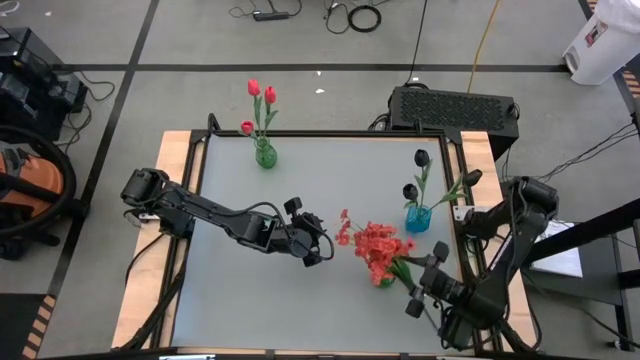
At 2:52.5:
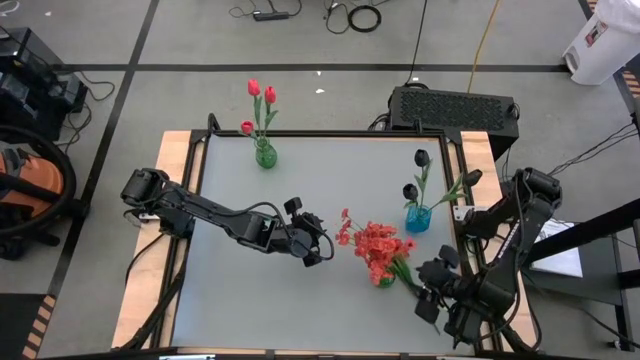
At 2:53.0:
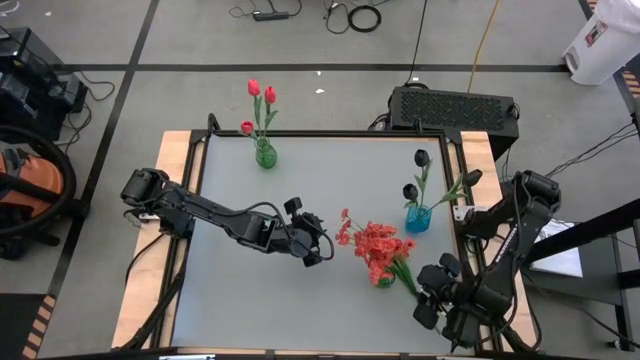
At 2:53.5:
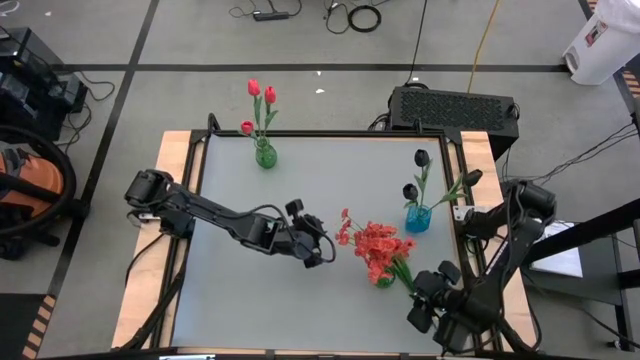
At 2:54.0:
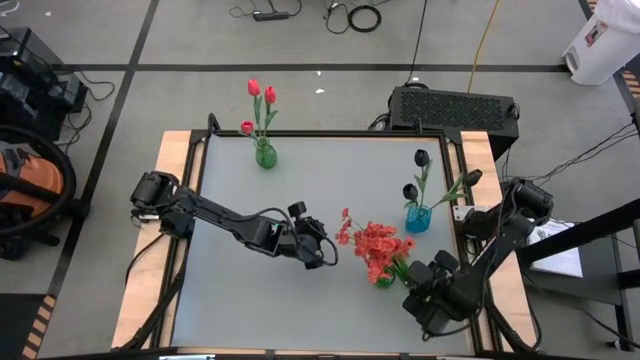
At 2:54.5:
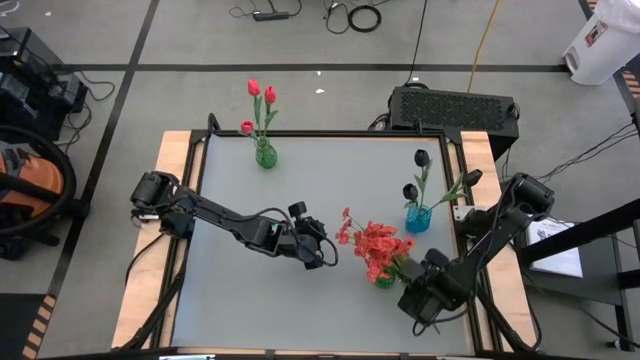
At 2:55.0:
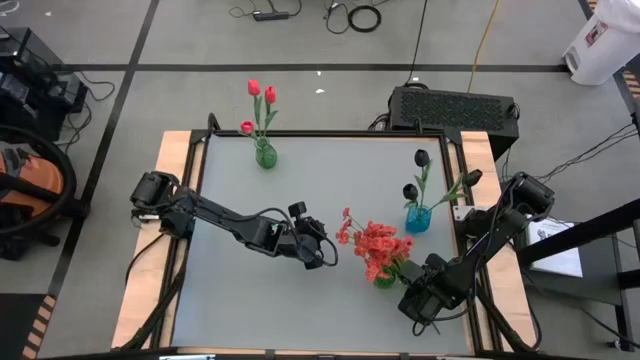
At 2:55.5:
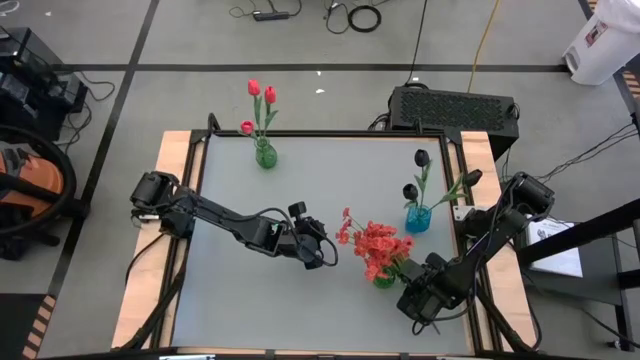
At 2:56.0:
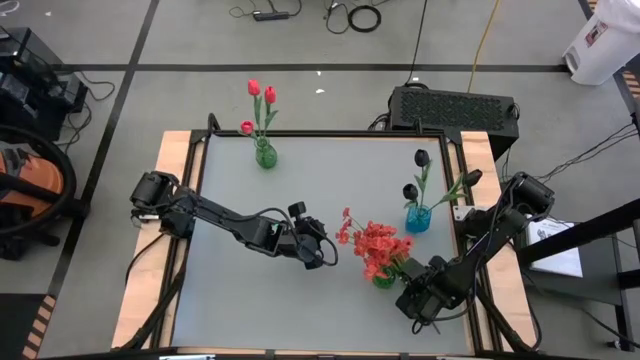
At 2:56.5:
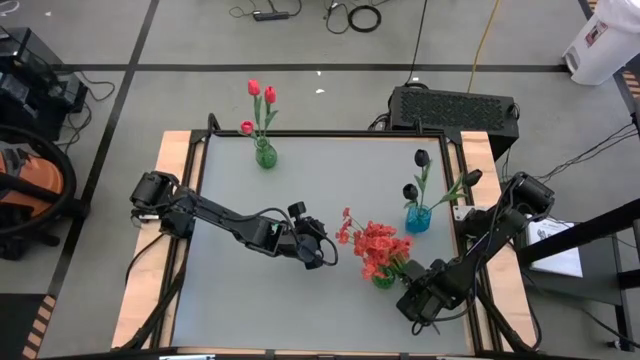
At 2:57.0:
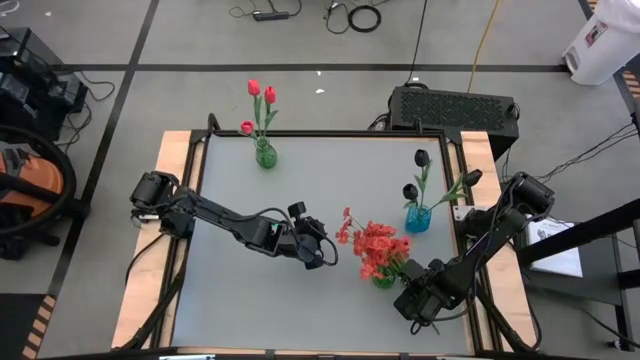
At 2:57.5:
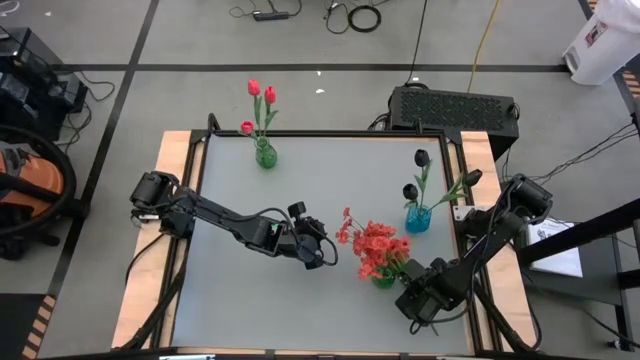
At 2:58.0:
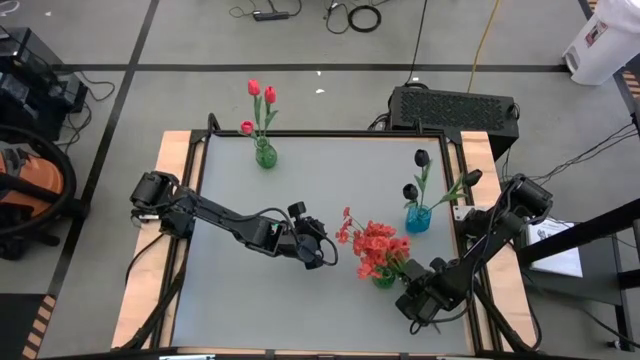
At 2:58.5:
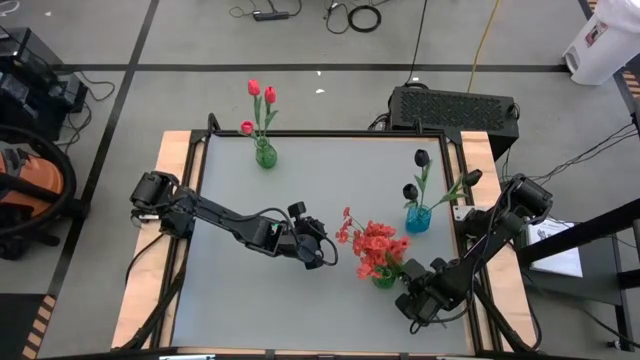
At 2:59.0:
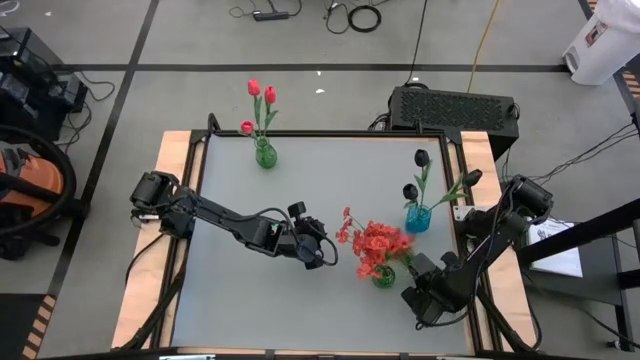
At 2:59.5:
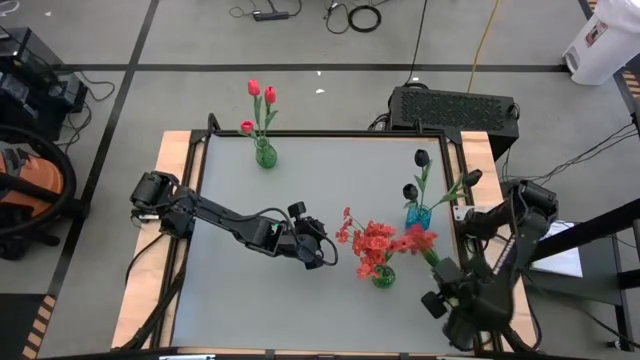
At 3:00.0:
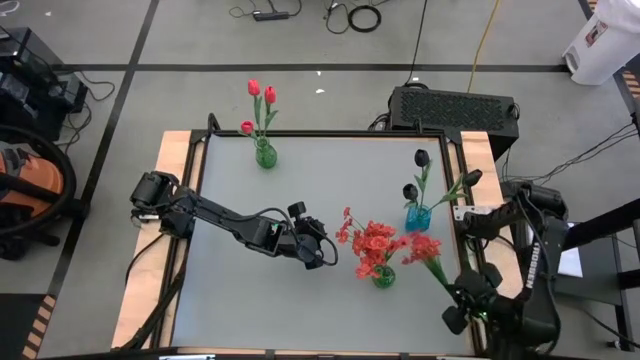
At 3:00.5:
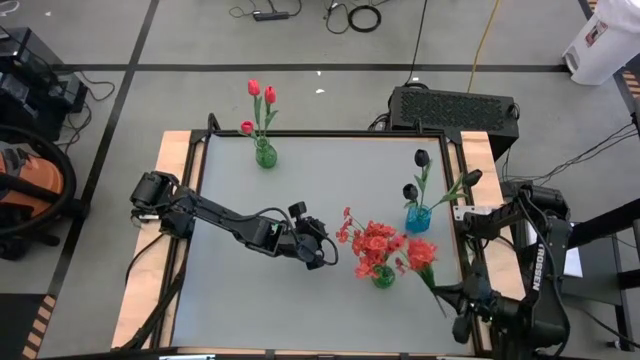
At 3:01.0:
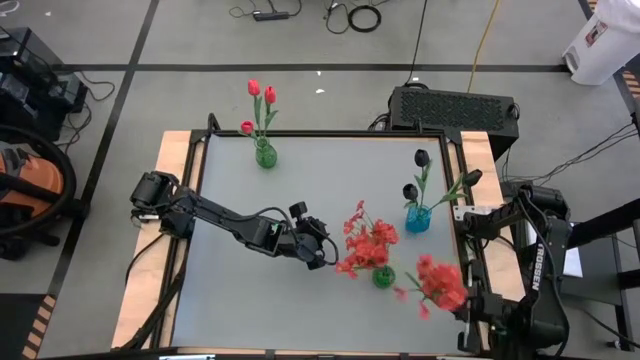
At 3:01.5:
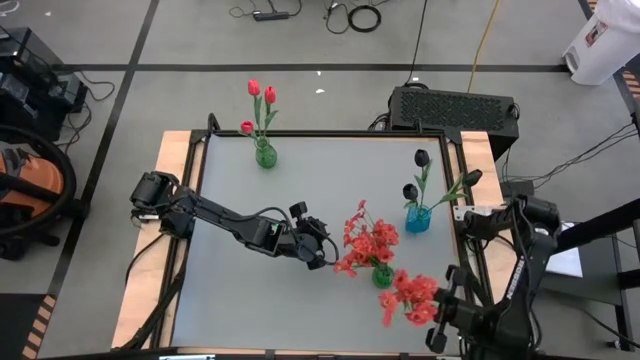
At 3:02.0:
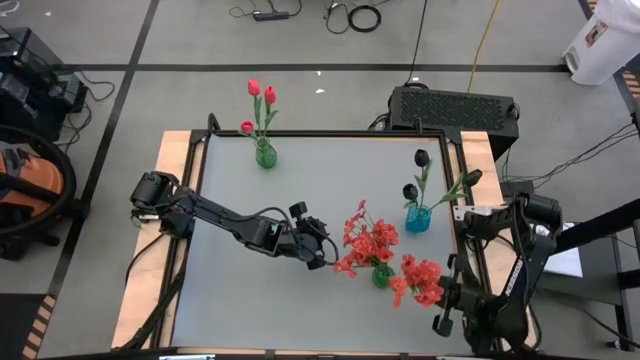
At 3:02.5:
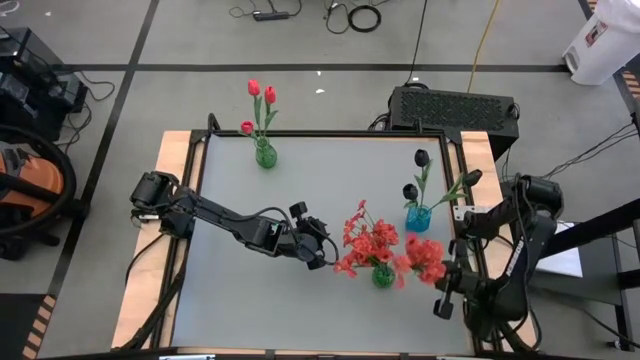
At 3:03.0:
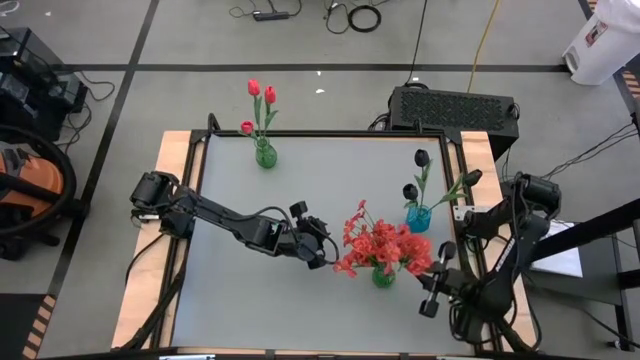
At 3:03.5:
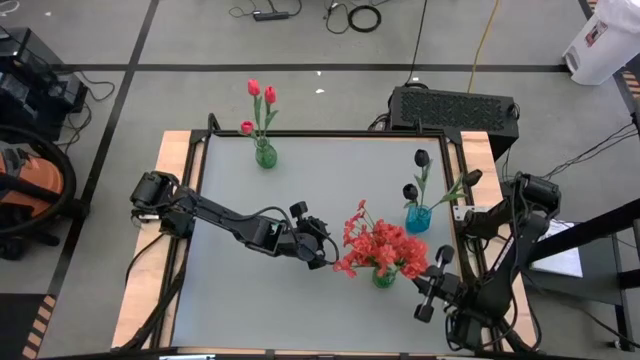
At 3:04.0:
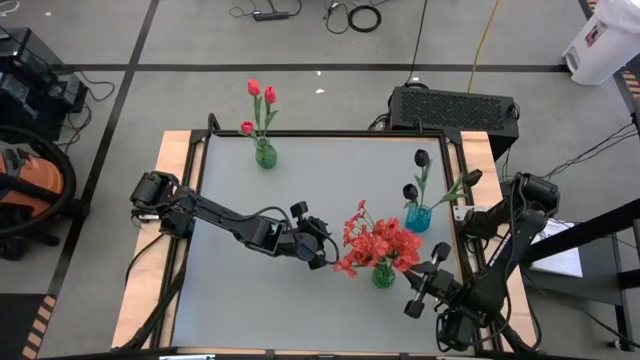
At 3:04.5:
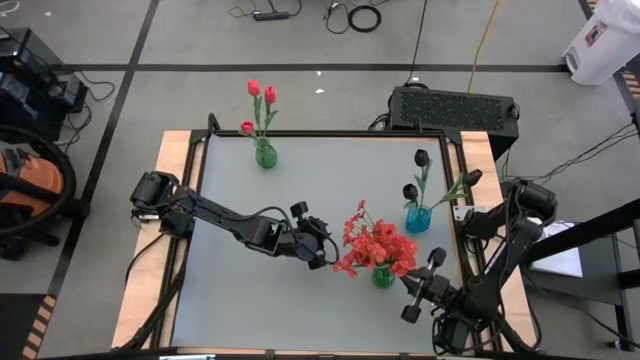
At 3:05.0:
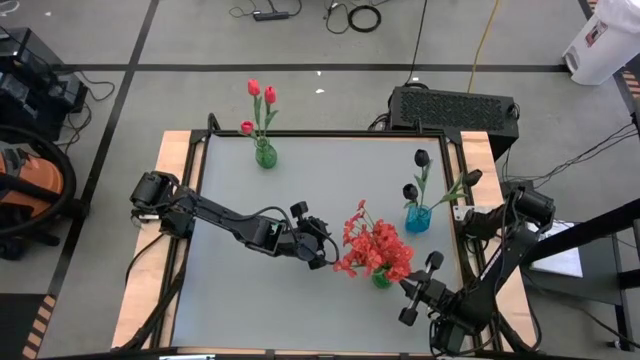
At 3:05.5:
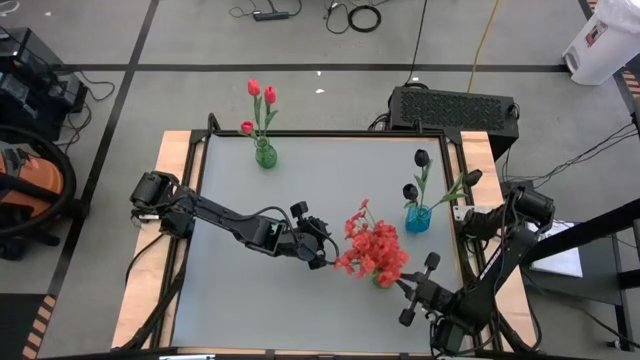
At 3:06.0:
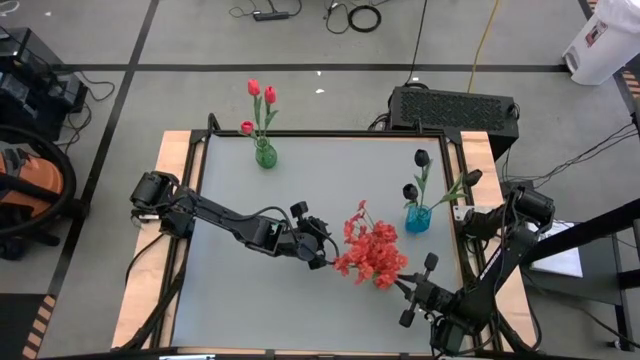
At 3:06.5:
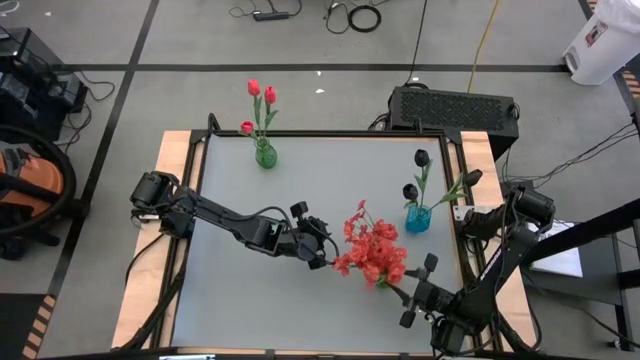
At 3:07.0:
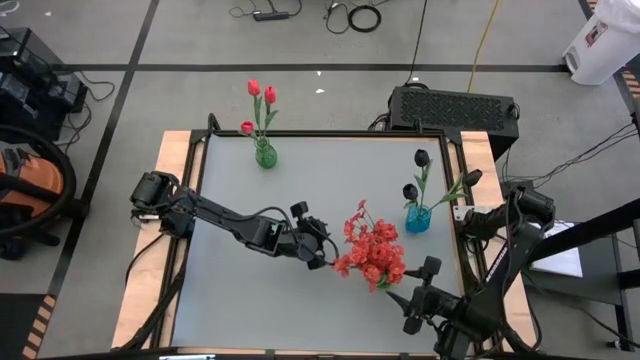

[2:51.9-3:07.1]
Task: Sort flowers into vase by color
Put the red flowers into the bottom green vase

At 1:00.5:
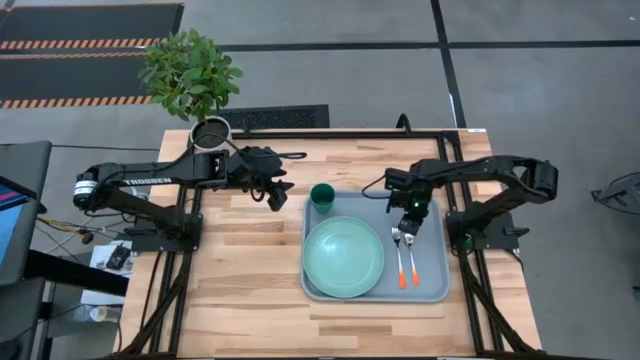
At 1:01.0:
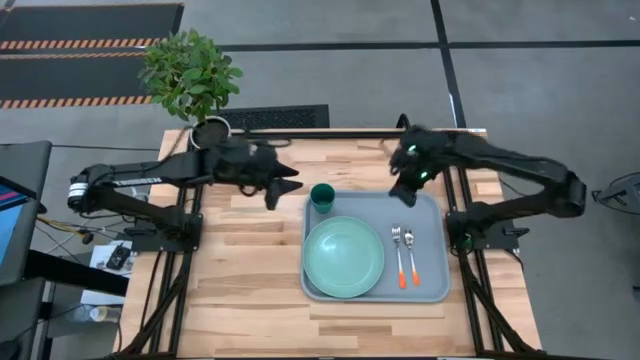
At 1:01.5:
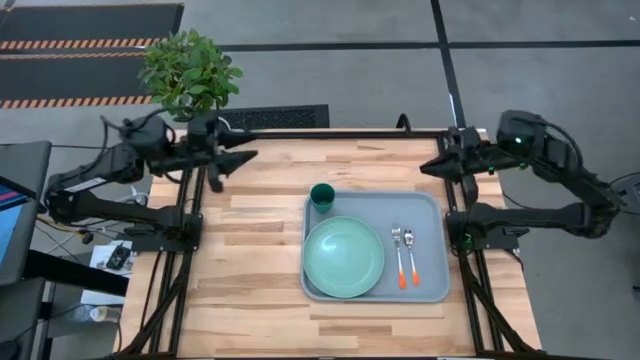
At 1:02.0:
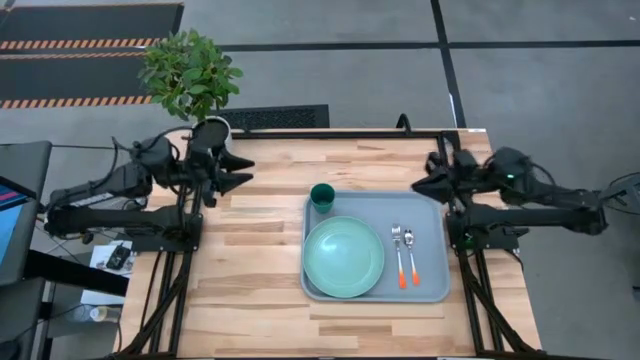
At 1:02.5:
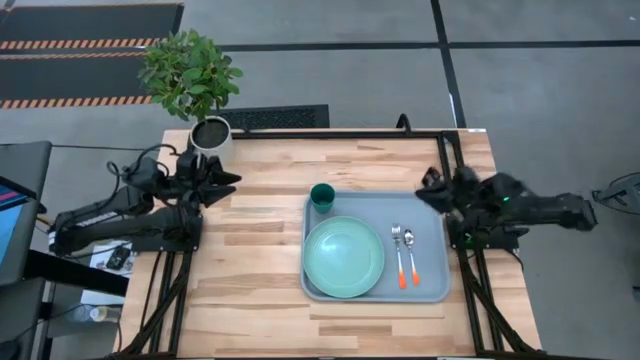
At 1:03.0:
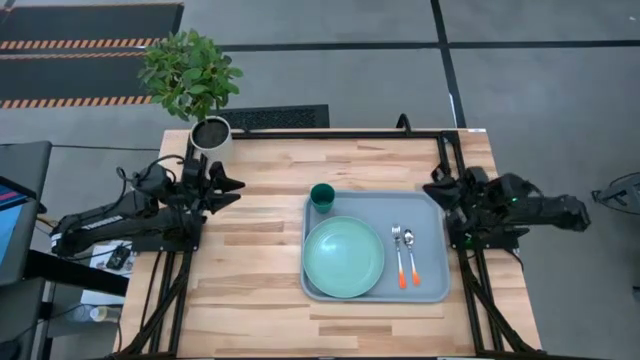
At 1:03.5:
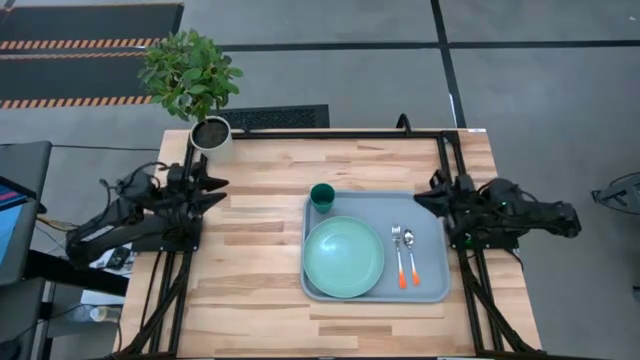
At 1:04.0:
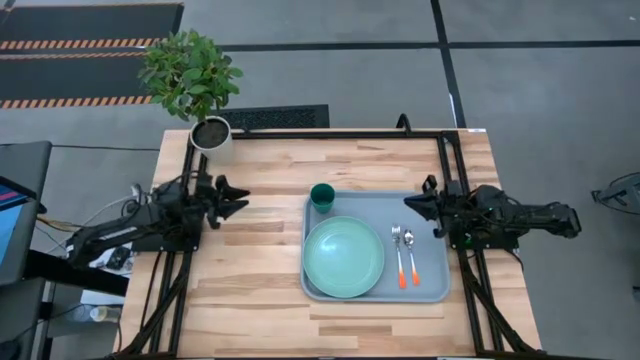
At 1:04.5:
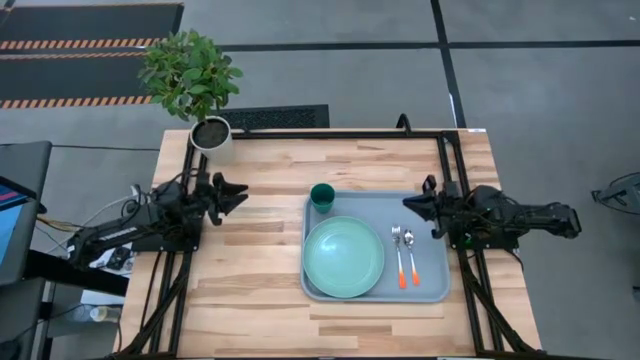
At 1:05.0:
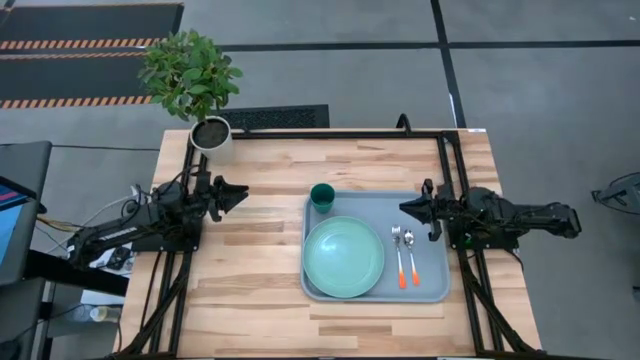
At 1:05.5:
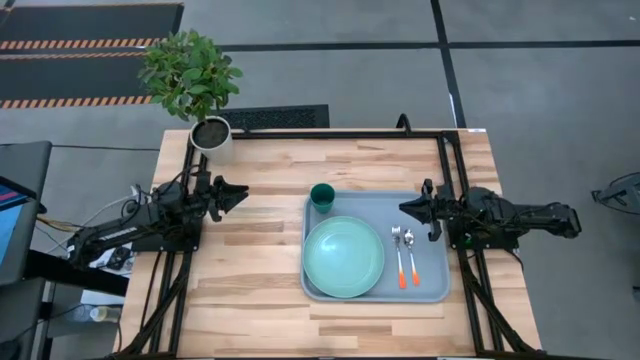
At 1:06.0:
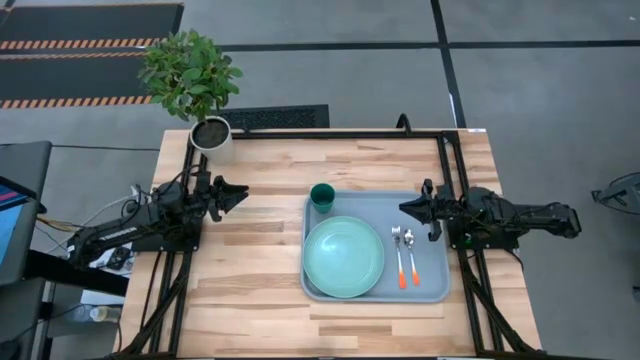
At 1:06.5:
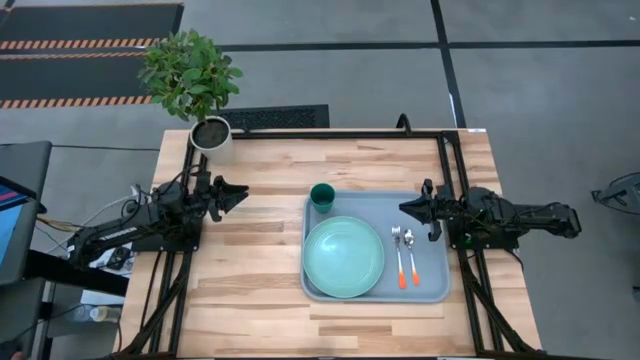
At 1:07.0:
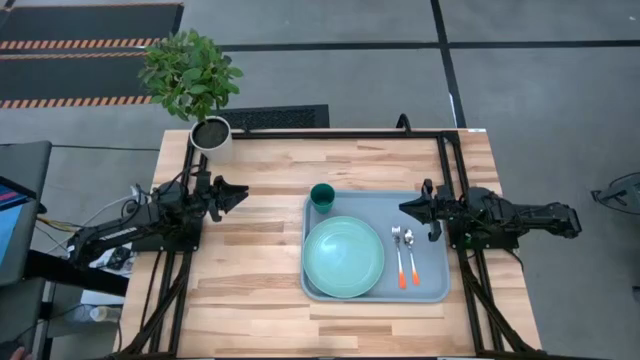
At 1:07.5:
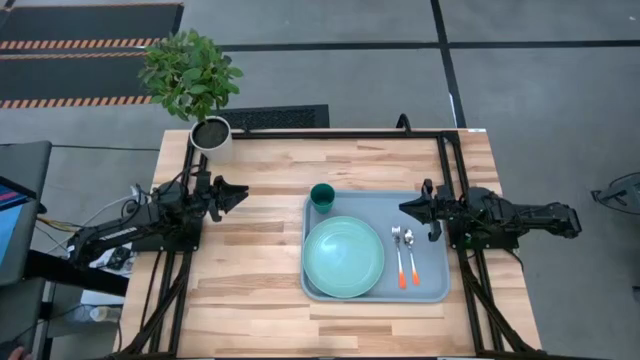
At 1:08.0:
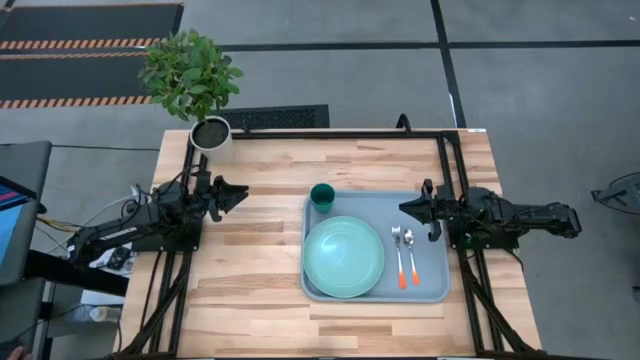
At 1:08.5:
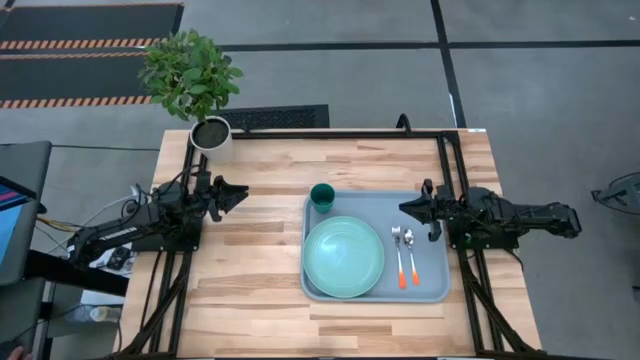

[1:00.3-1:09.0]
Task: Pick and place plate/cup/fork/spoon on tray
Return to Home Position
